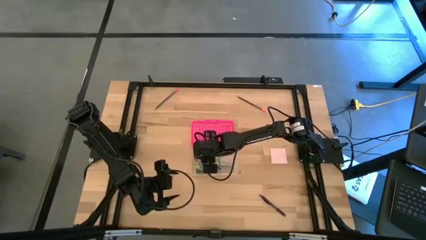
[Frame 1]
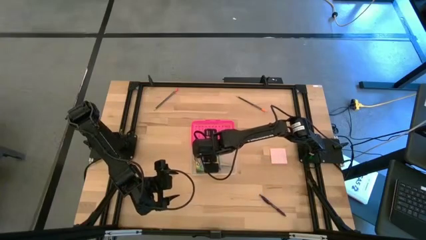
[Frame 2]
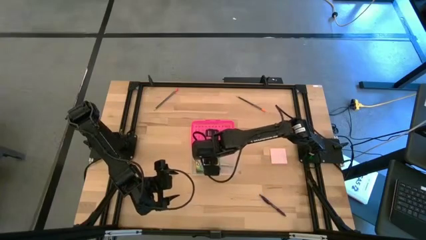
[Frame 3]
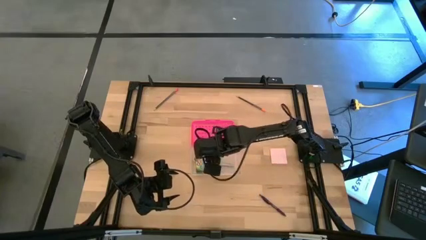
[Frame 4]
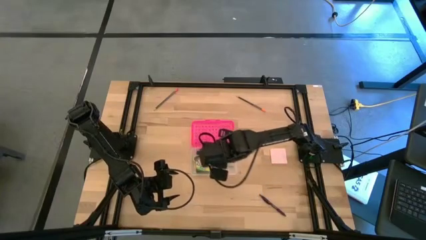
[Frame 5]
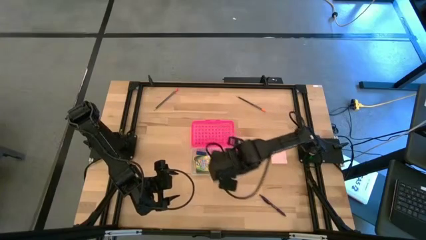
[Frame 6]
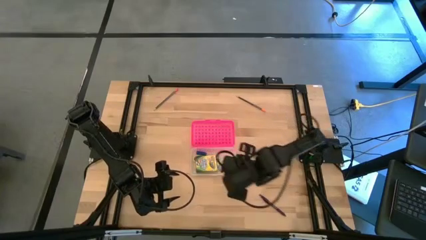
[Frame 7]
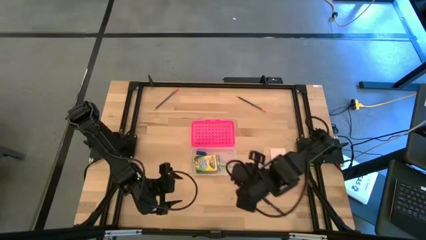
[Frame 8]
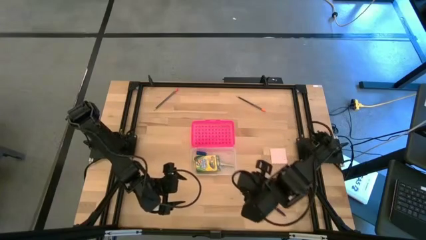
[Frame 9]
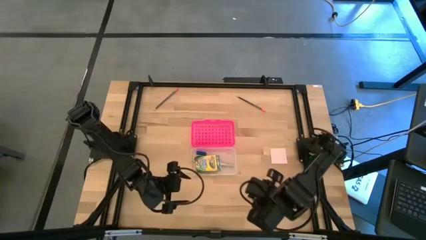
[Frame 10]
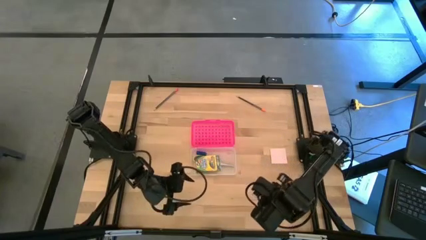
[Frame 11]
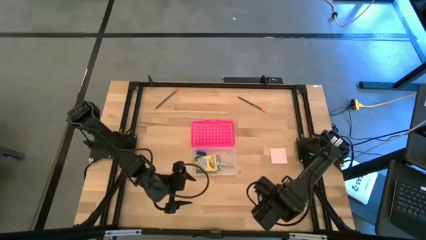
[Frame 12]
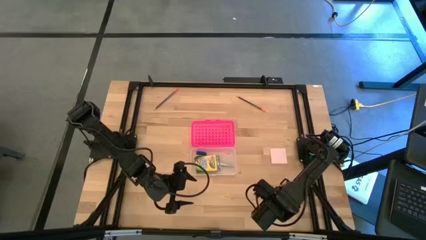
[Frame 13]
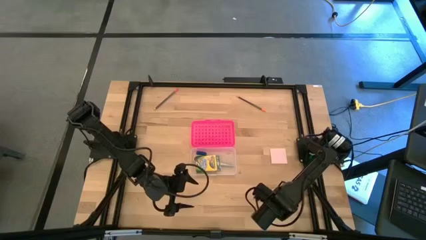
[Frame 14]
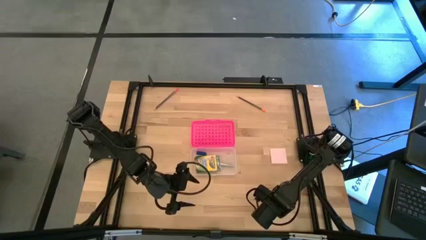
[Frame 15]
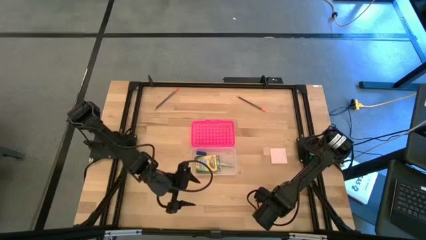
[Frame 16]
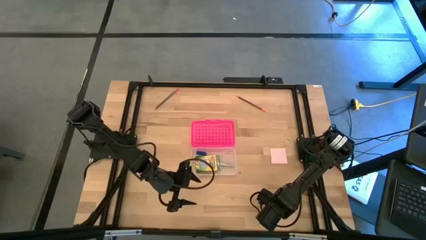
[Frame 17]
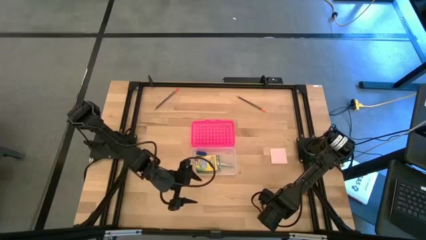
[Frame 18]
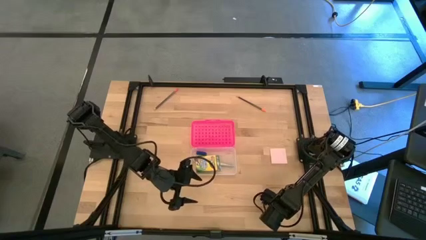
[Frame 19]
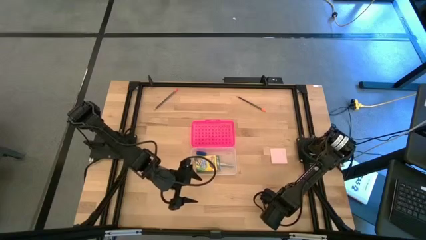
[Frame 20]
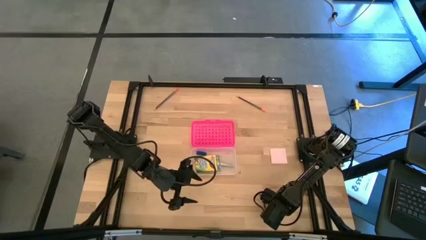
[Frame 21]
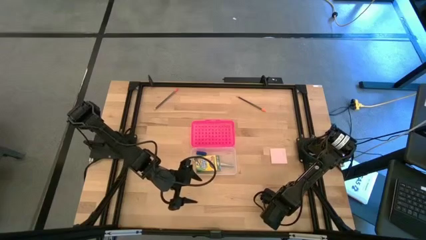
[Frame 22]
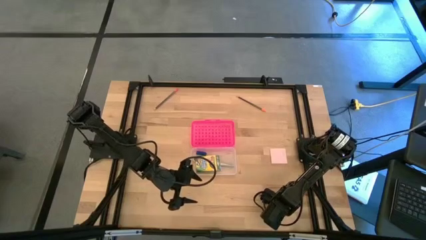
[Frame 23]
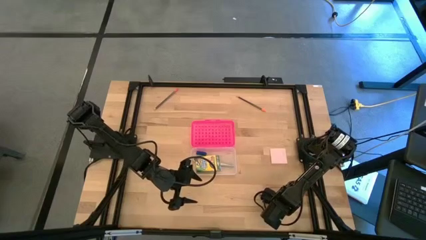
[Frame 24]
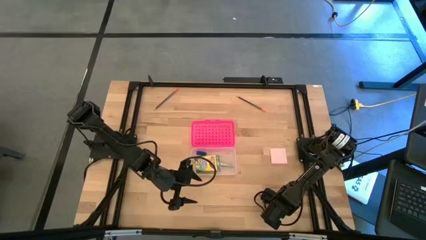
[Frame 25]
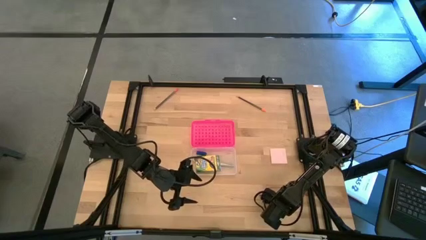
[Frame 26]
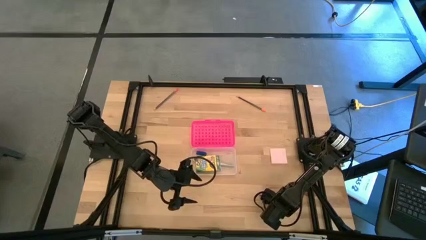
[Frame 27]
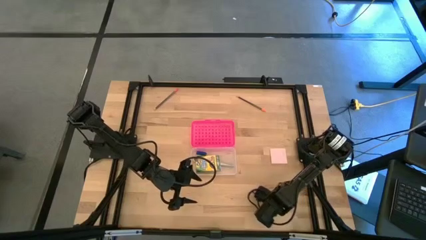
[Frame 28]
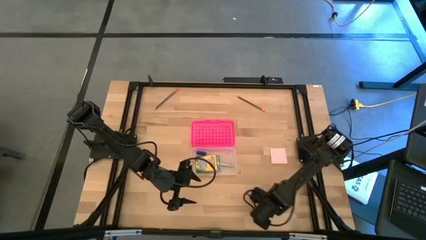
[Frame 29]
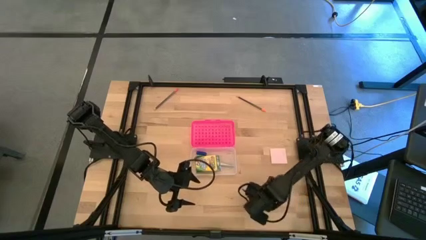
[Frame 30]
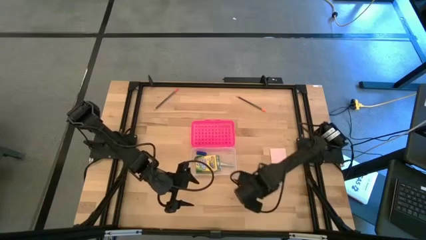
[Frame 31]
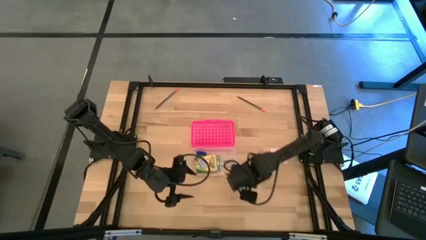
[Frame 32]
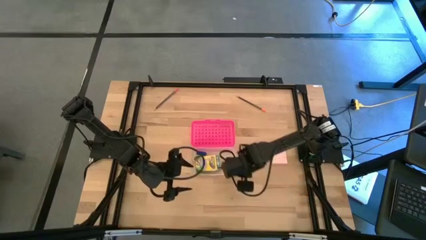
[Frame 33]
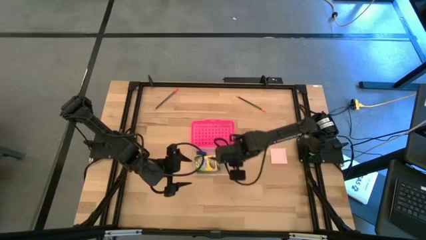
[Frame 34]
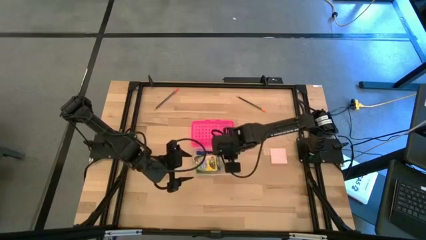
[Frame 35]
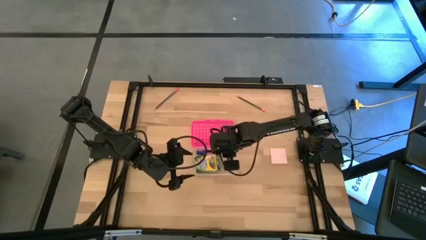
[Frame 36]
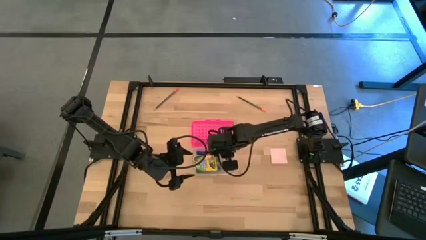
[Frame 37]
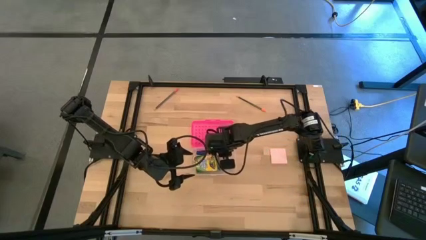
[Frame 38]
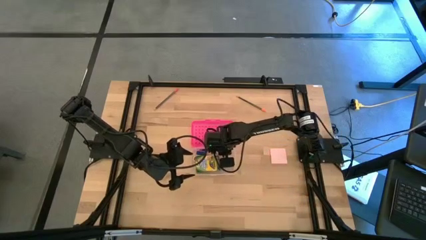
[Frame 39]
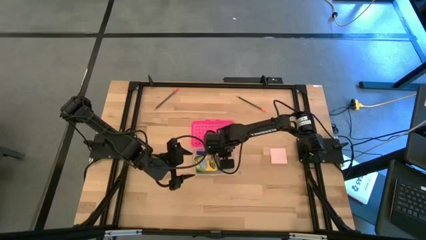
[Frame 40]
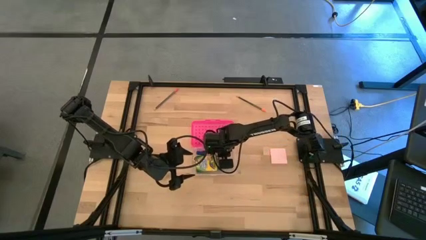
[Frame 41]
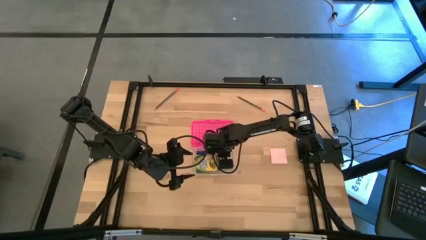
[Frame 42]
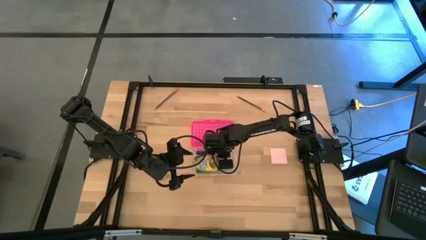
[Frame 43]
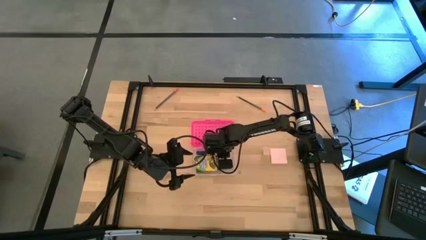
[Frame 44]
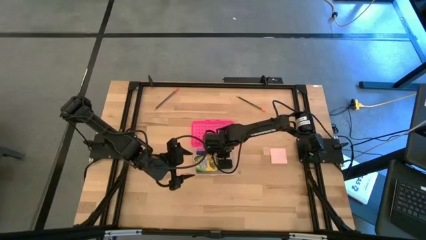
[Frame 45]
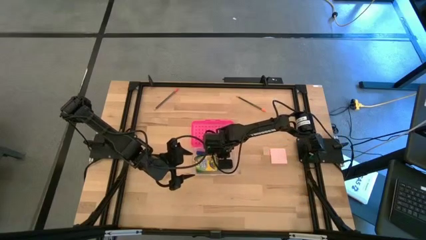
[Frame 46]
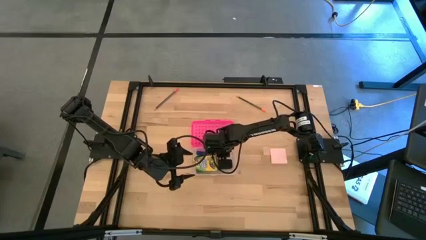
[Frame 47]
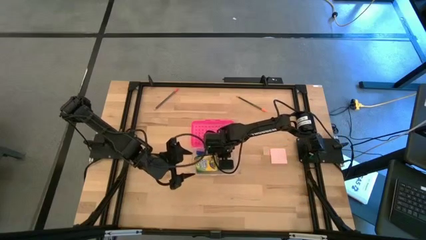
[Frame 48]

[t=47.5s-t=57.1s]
Task: Pack school essentials
Put the purple pen into the pencil case

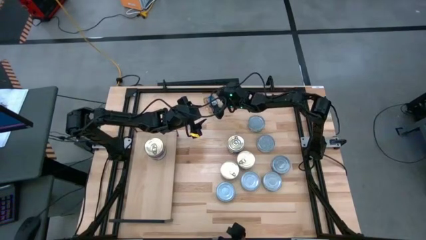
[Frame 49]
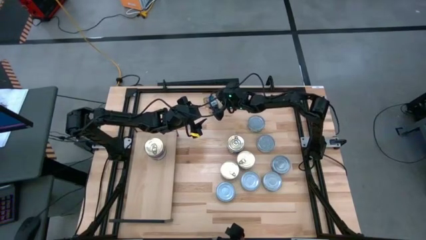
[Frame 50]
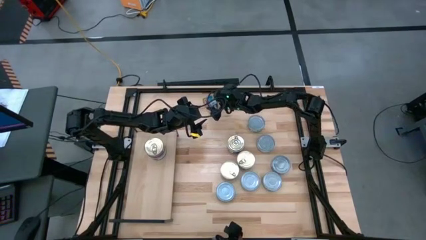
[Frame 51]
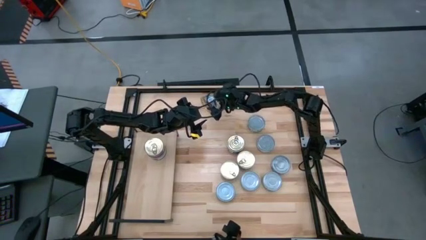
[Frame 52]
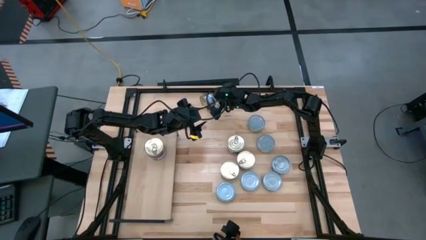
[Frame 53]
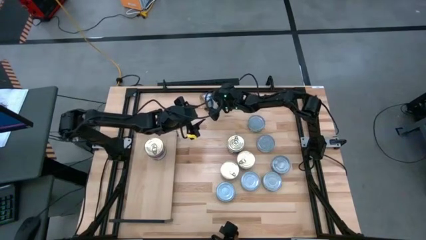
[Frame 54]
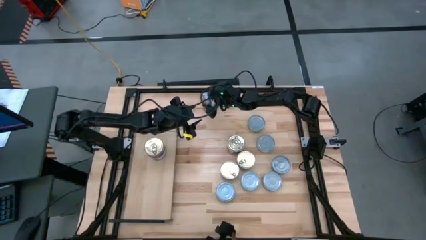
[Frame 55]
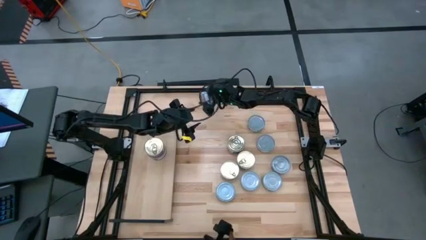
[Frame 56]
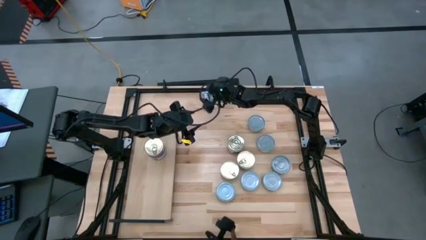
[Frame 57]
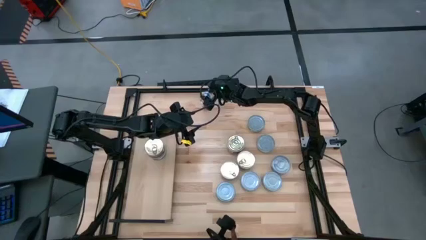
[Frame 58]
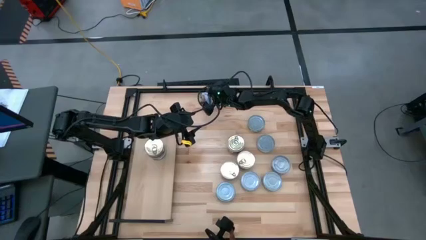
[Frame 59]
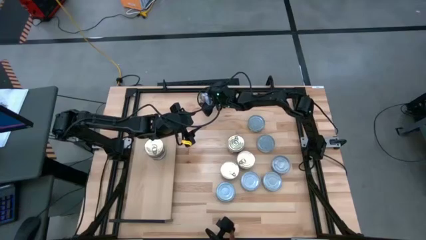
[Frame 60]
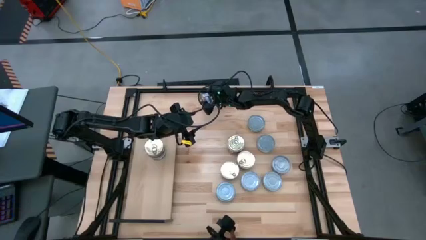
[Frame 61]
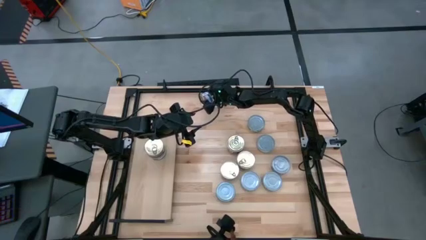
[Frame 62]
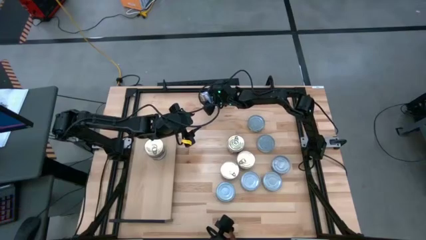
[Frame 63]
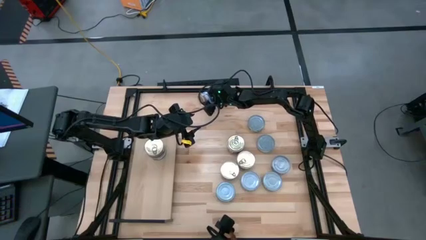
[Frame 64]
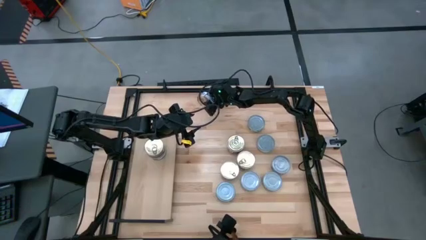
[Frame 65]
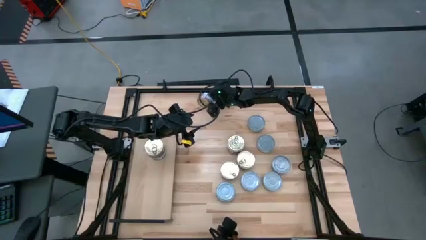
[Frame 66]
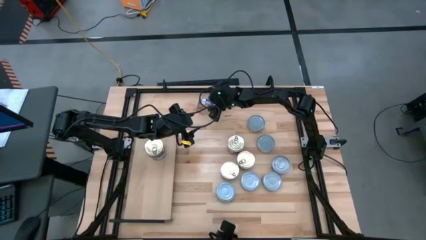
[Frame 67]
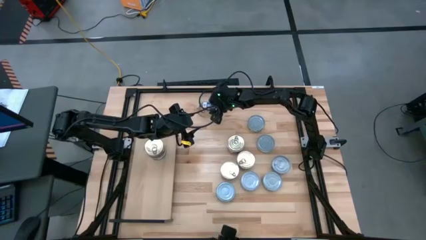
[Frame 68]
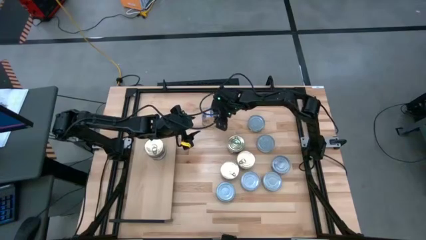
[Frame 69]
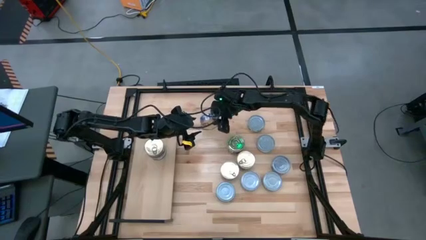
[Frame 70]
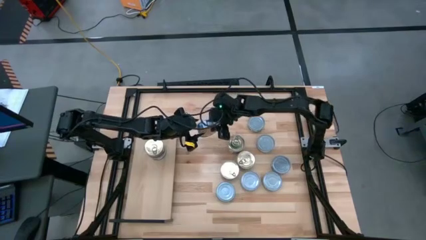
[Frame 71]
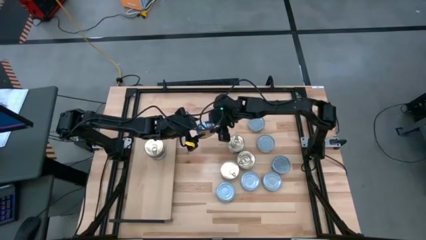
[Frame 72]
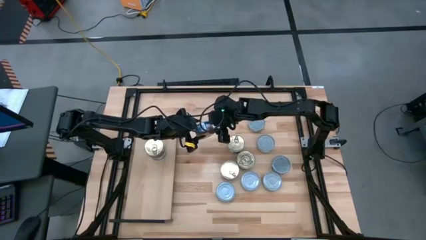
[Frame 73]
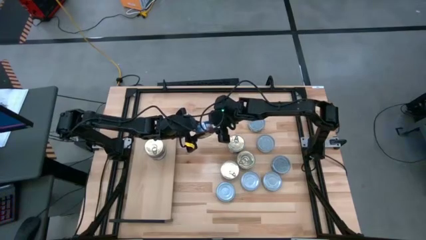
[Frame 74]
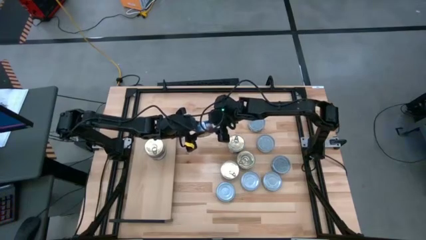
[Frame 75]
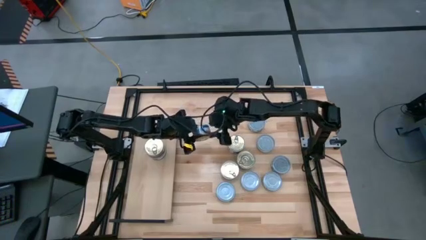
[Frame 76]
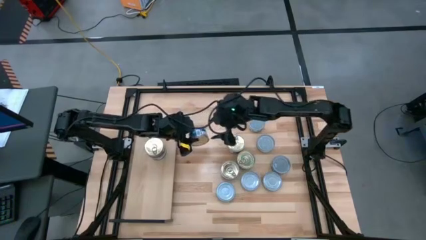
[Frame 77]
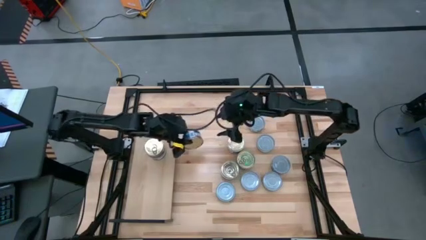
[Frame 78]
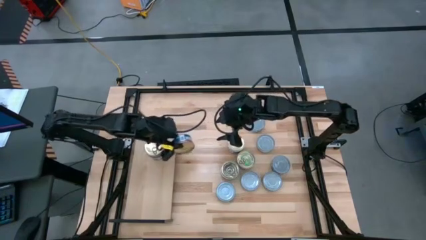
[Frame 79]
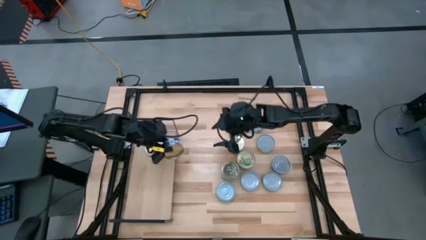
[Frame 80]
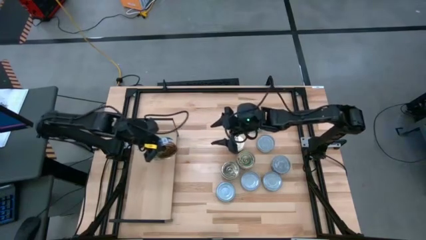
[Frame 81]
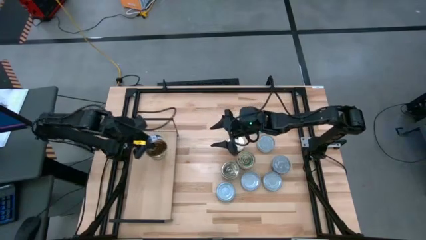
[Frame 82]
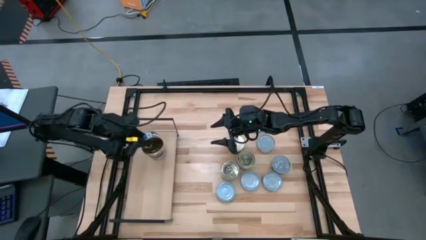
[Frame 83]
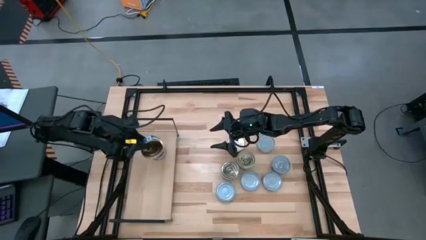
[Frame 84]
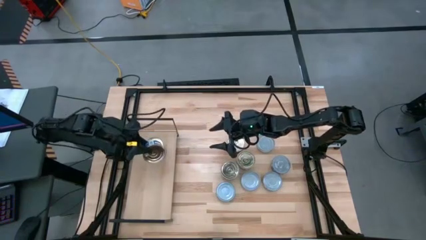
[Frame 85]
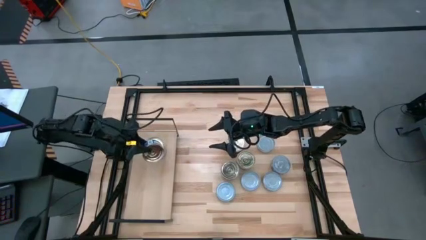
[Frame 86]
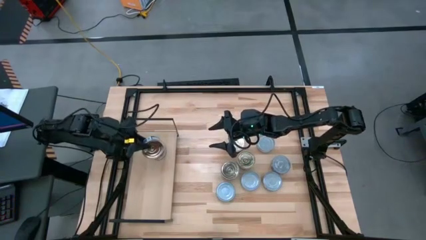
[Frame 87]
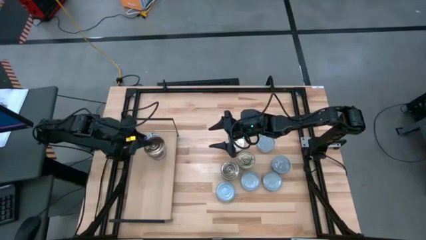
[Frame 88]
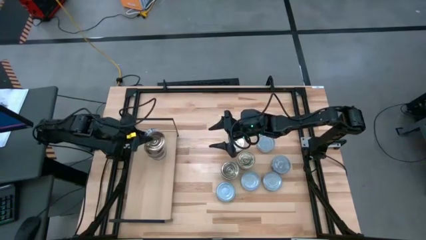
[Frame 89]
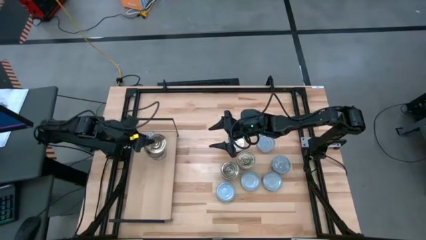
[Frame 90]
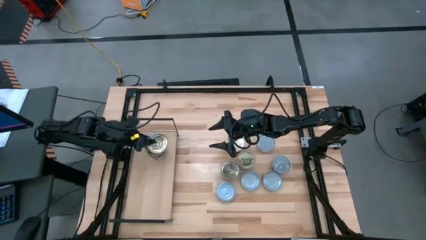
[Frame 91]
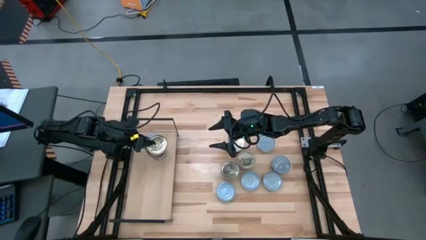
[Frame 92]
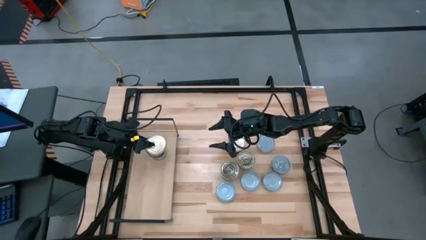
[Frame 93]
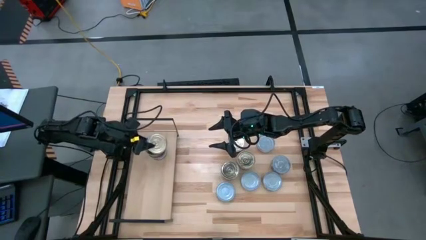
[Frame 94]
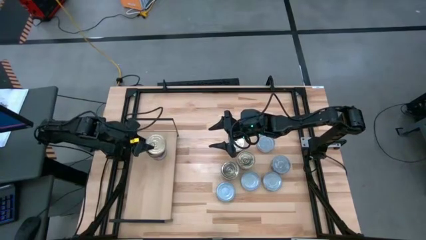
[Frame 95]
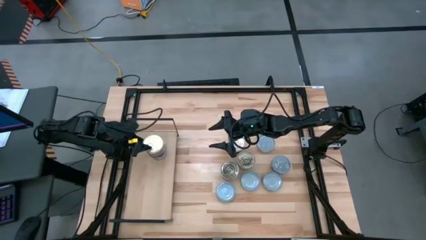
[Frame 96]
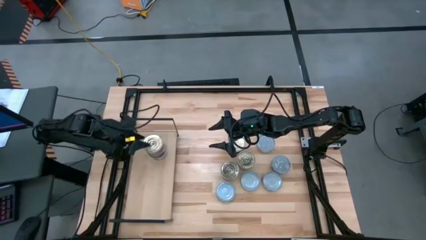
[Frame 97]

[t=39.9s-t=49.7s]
Task: Stack canned seafood by type on shelf
Stack the blue and pink tuna can on the blue and pink tuna can on the shelf
